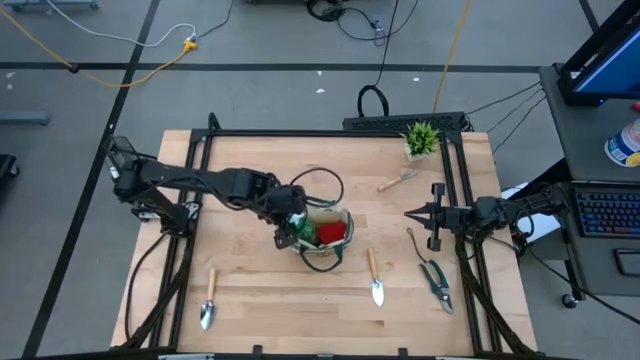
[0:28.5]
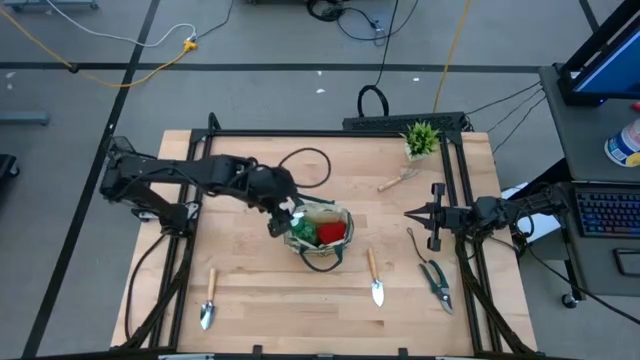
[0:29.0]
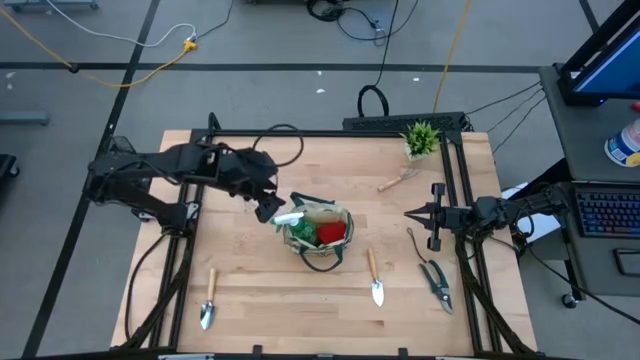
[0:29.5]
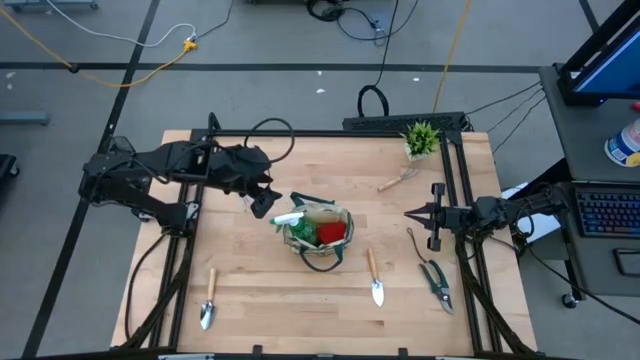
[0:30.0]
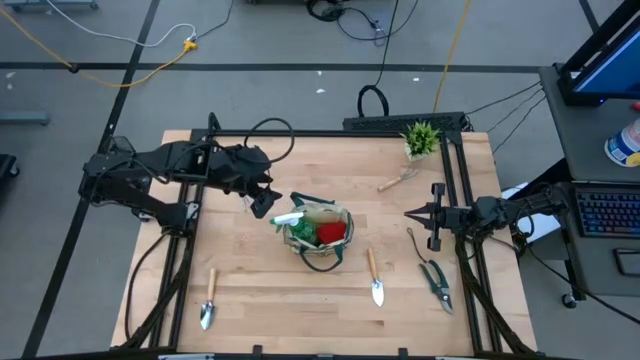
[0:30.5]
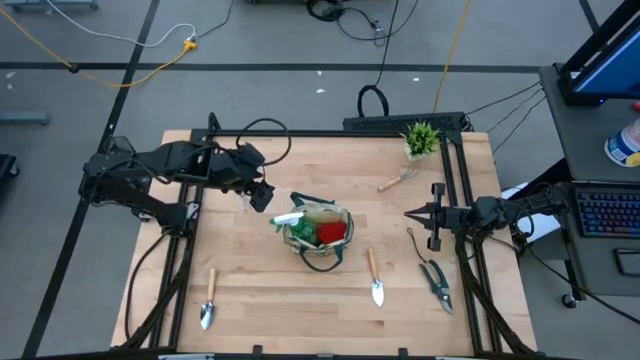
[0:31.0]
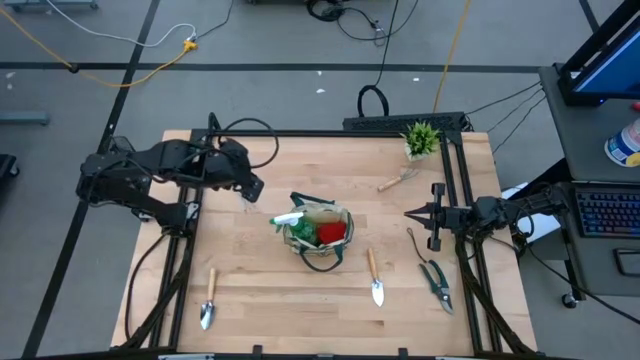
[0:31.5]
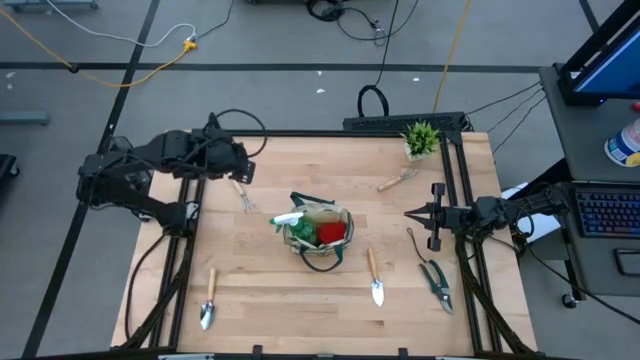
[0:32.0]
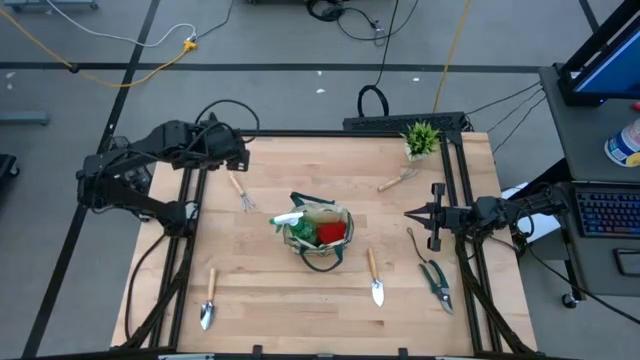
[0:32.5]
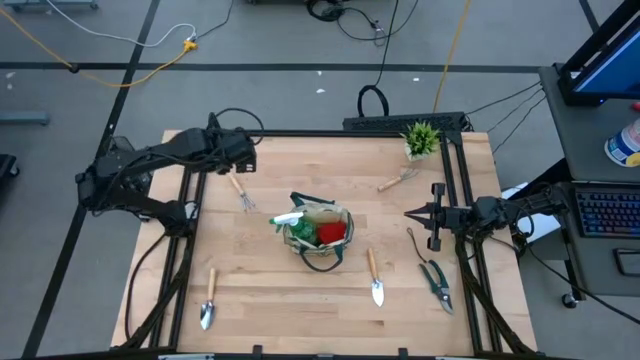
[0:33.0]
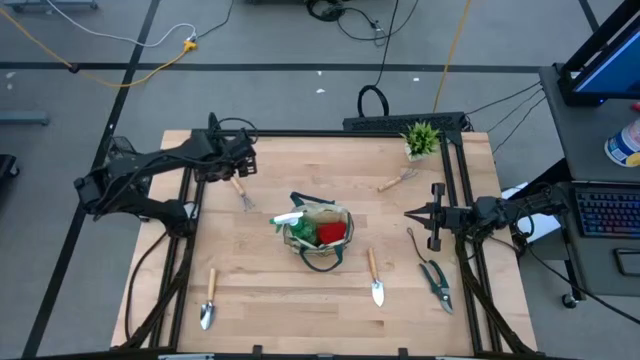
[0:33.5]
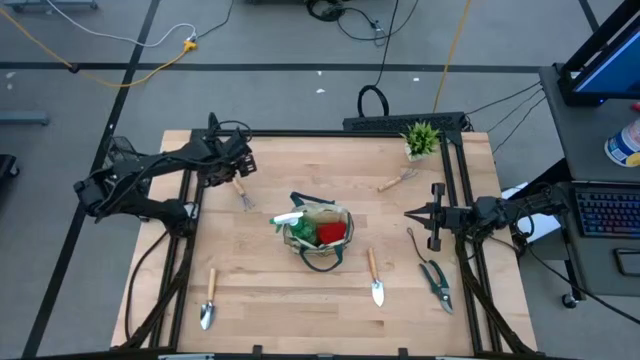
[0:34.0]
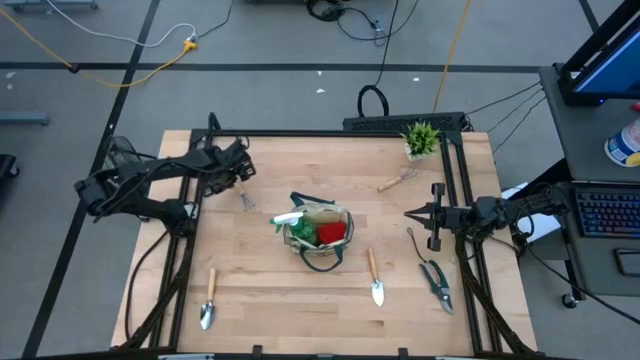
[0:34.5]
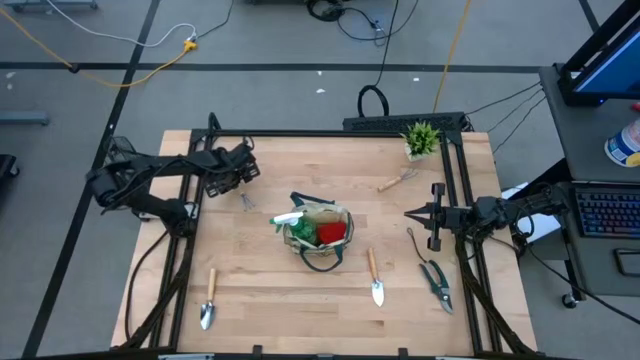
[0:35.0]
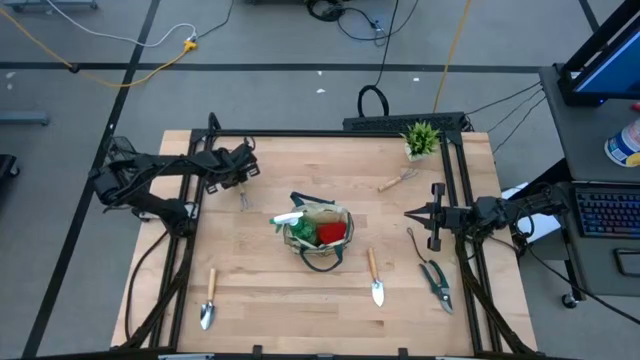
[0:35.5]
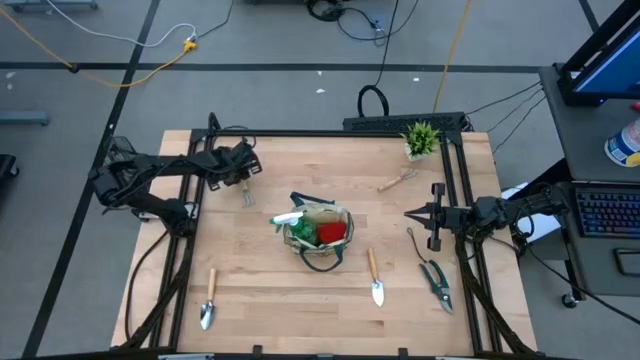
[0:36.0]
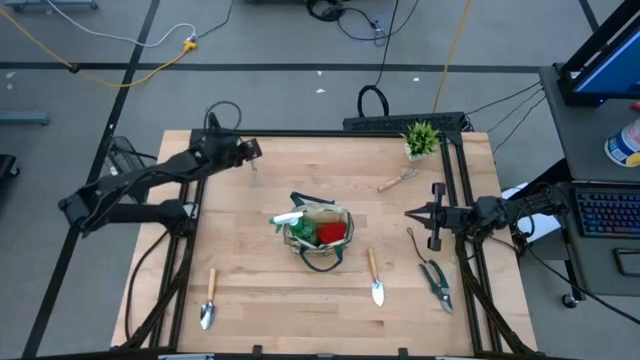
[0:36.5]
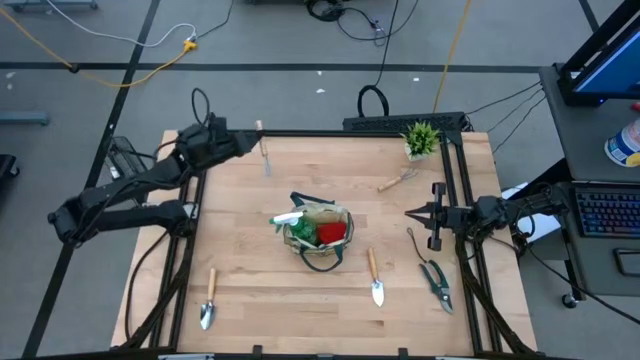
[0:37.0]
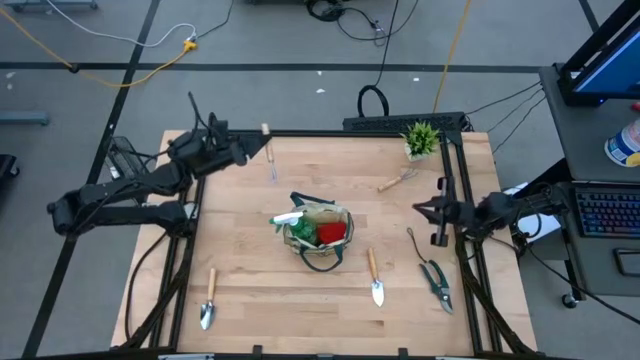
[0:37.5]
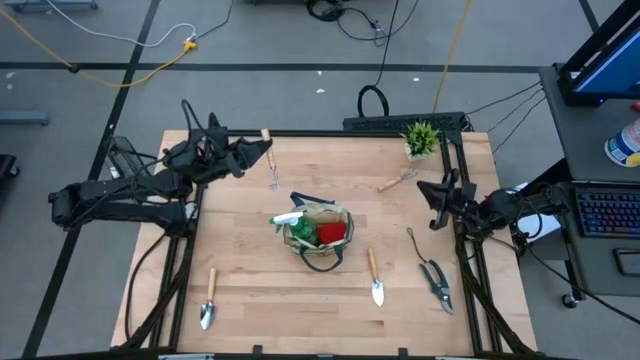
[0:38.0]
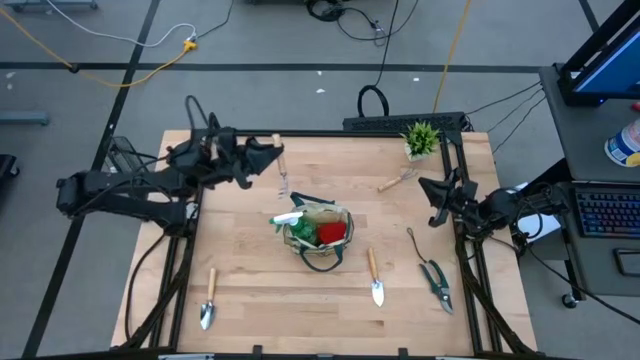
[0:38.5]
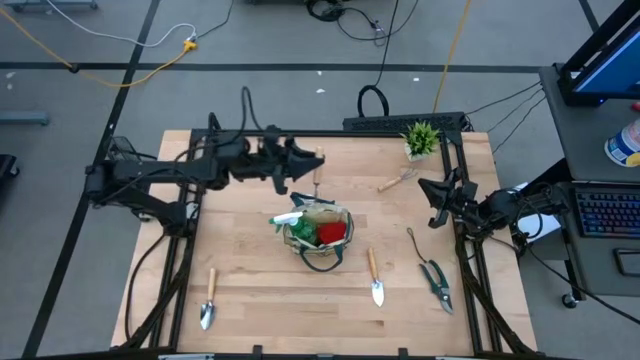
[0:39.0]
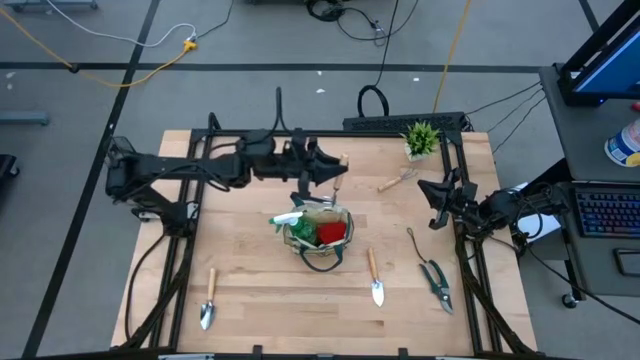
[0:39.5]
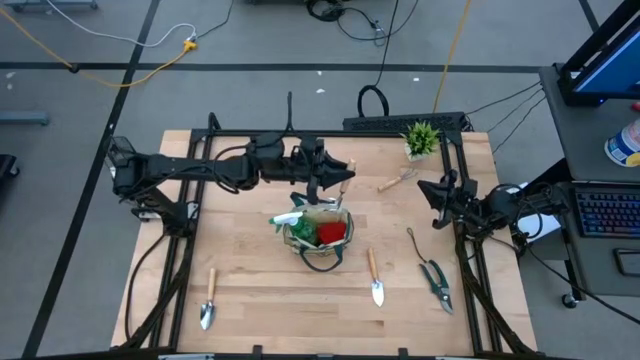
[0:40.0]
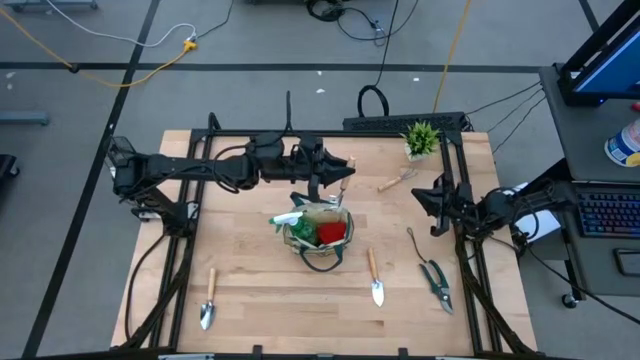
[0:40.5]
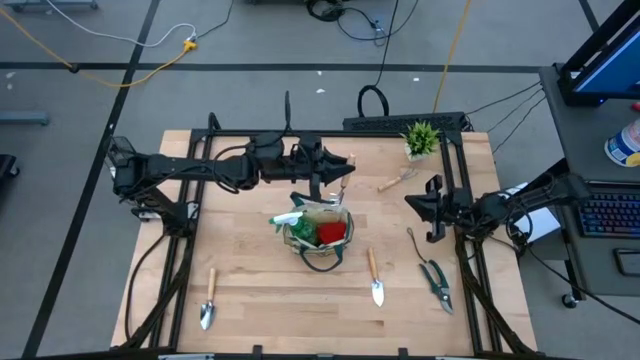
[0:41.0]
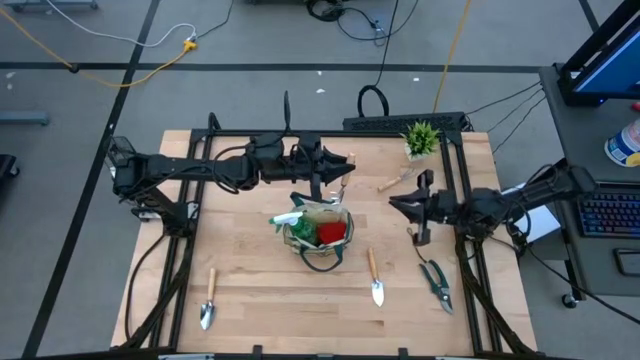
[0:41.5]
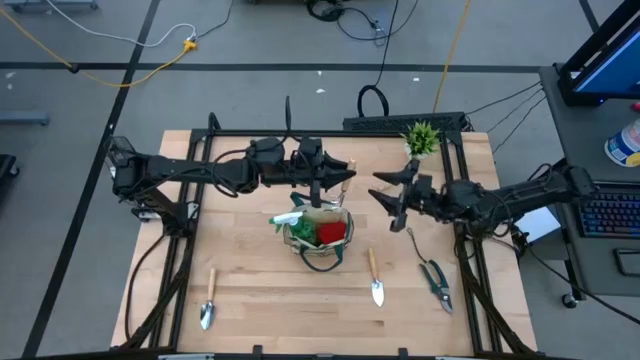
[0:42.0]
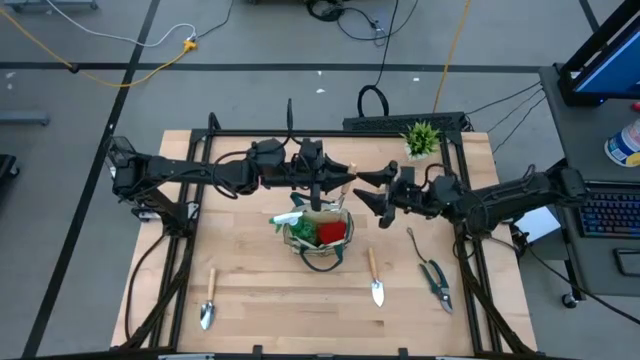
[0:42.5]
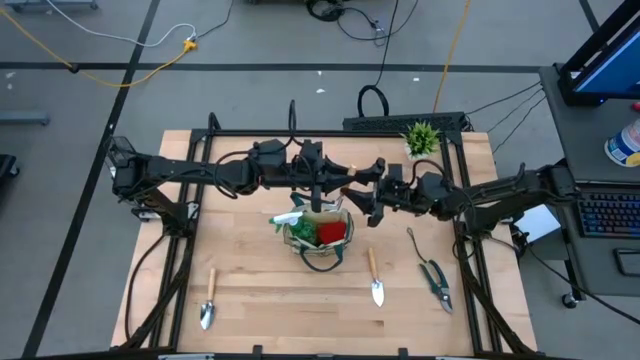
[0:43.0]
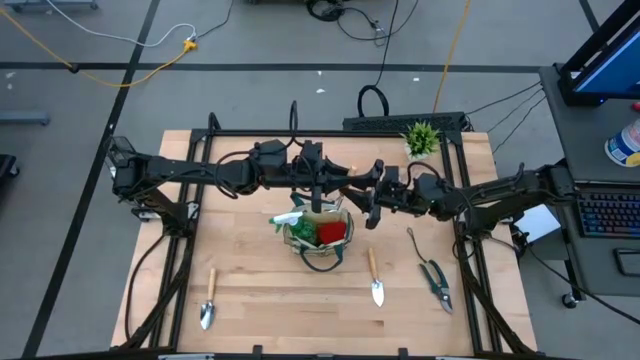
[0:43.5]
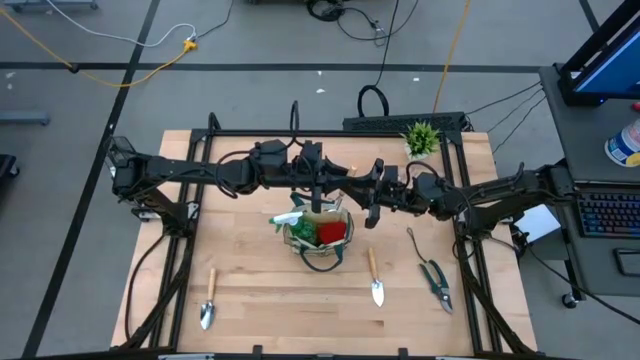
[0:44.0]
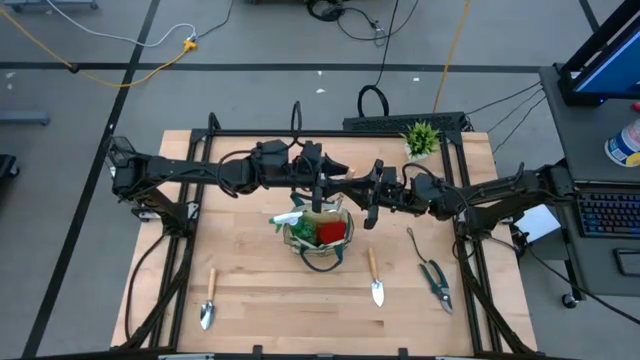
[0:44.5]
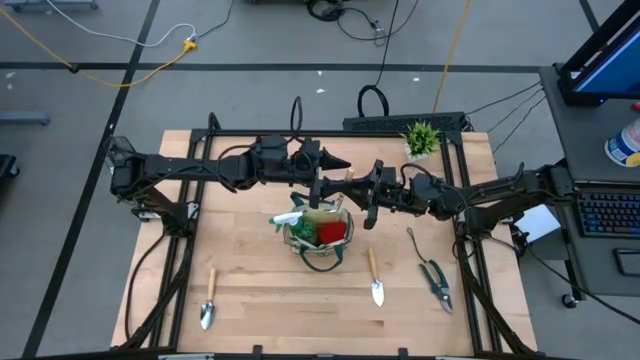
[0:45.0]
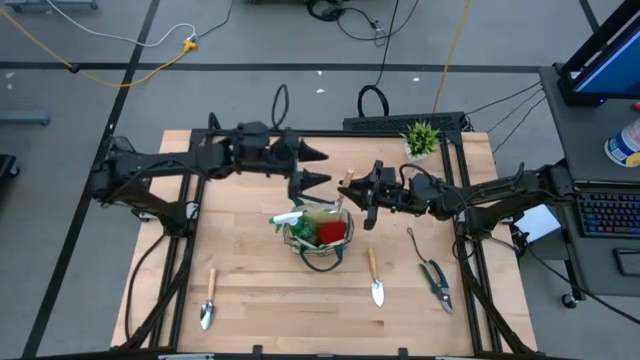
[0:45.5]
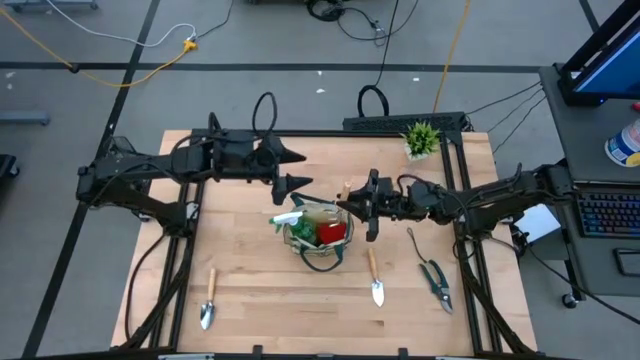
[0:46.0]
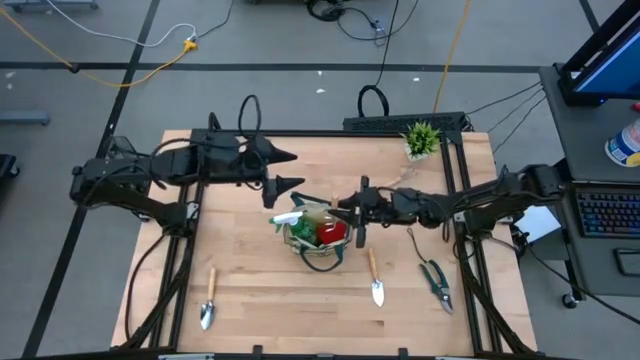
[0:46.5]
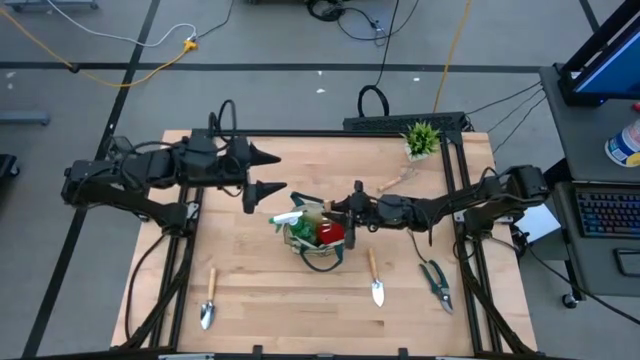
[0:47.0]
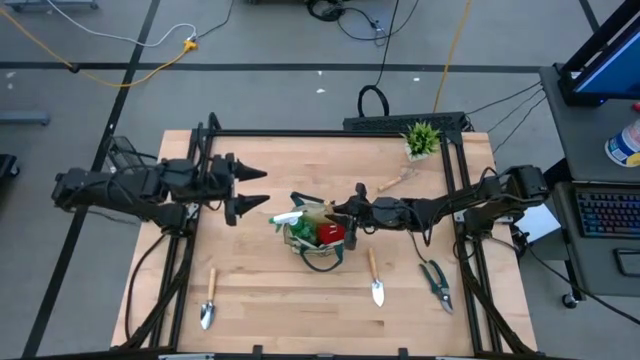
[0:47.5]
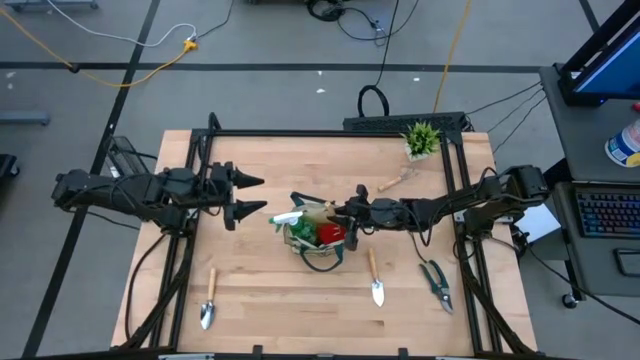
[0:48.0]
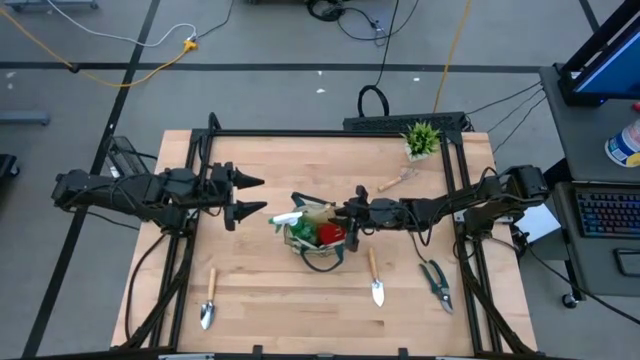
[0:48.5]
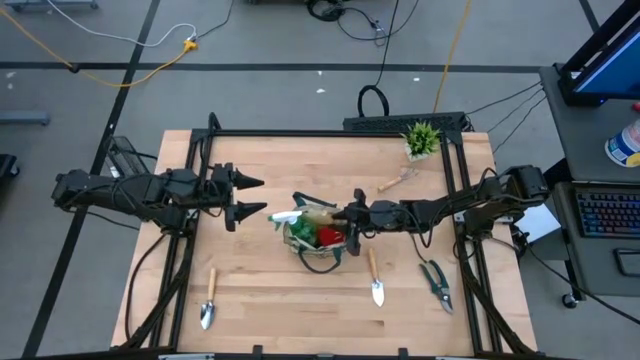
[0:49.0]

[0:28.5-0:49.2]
Task: Pick & Place Garden tools in Gardening bag
Put the left brown hand rake into the gardening bag
